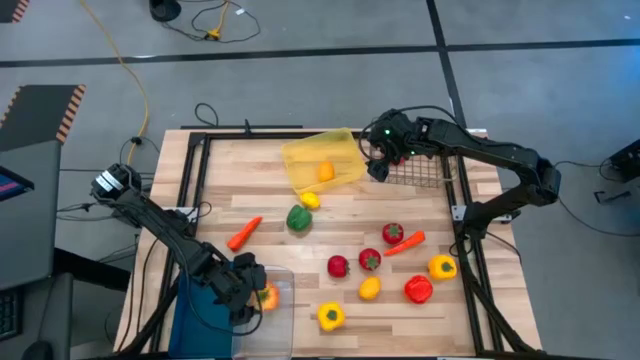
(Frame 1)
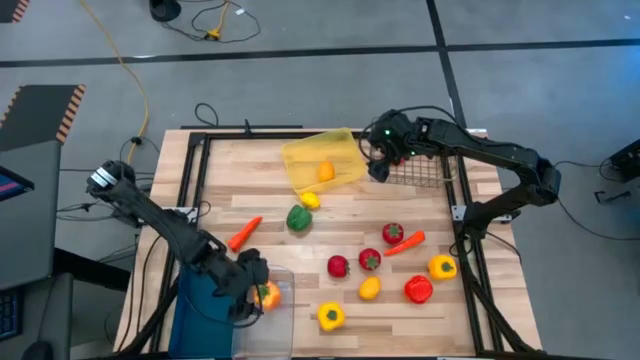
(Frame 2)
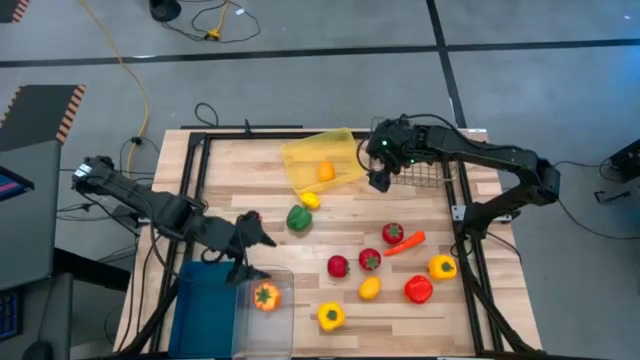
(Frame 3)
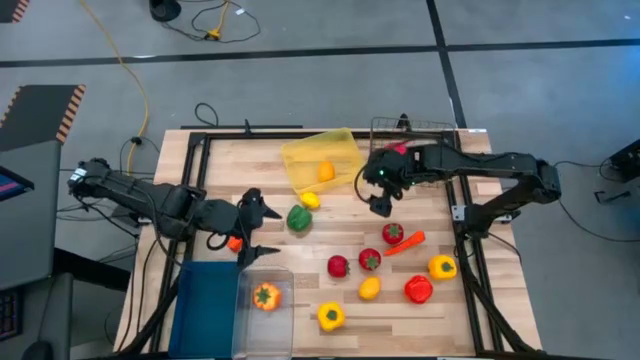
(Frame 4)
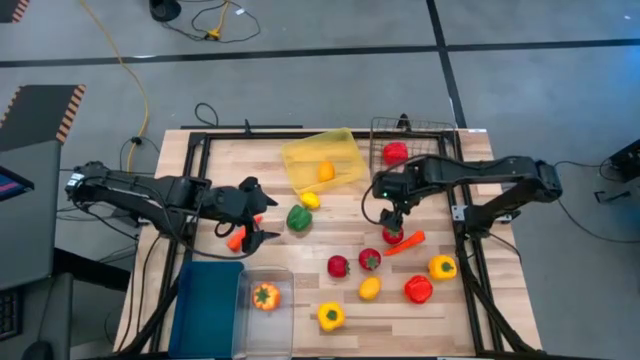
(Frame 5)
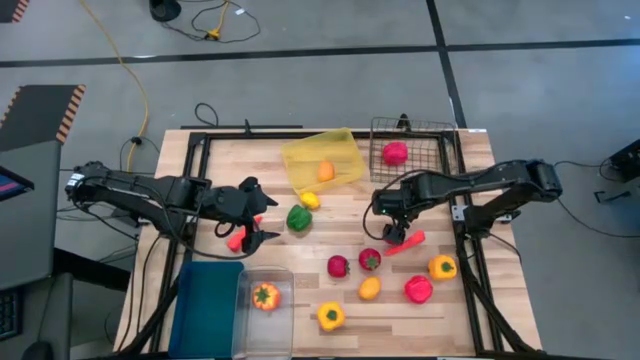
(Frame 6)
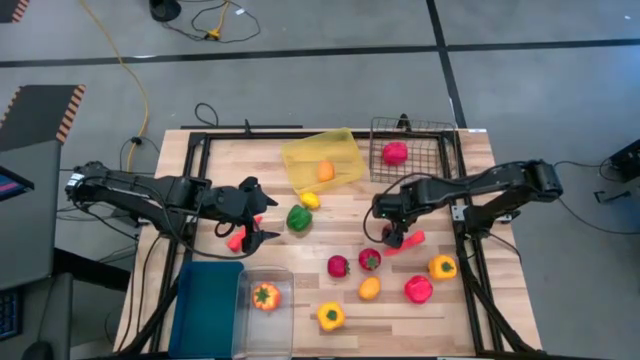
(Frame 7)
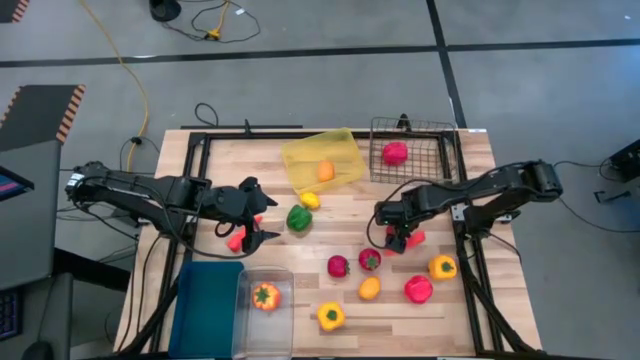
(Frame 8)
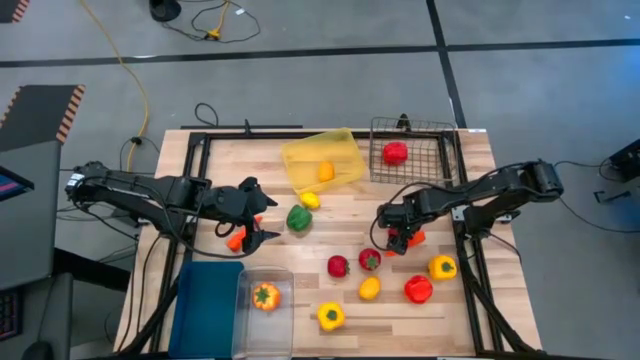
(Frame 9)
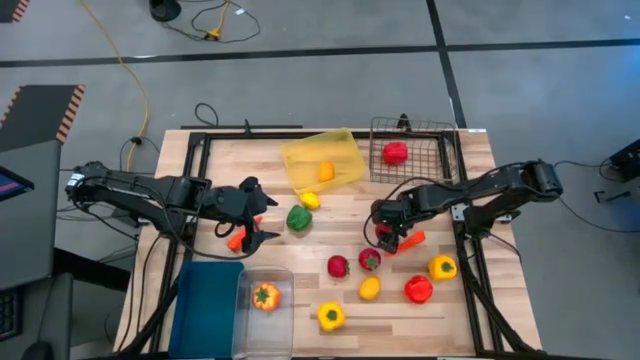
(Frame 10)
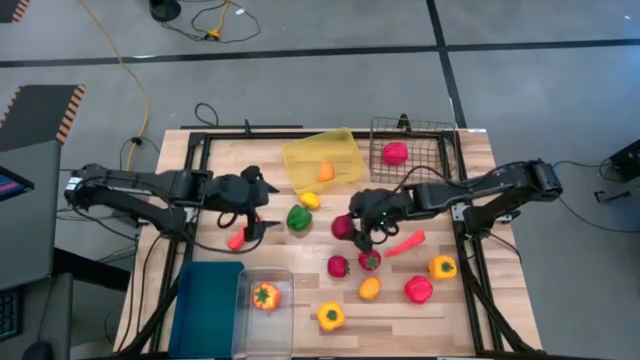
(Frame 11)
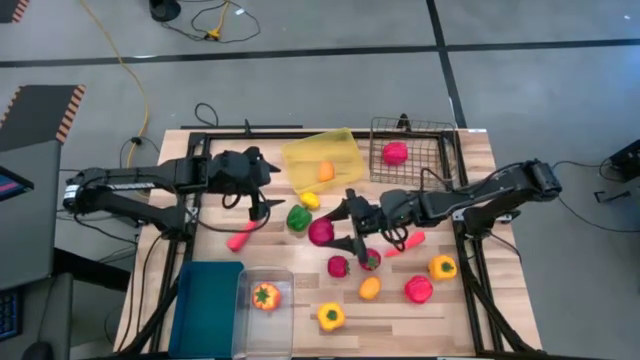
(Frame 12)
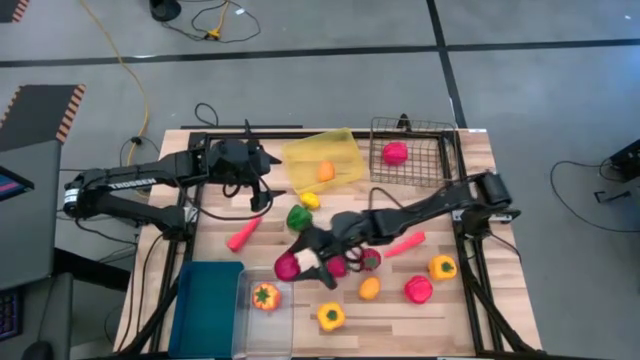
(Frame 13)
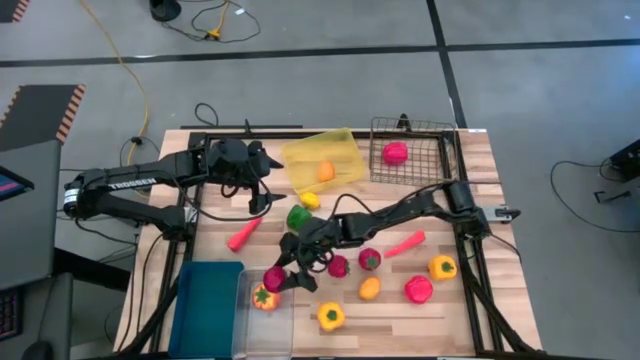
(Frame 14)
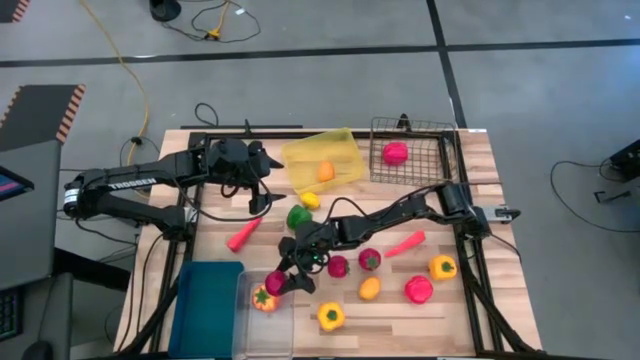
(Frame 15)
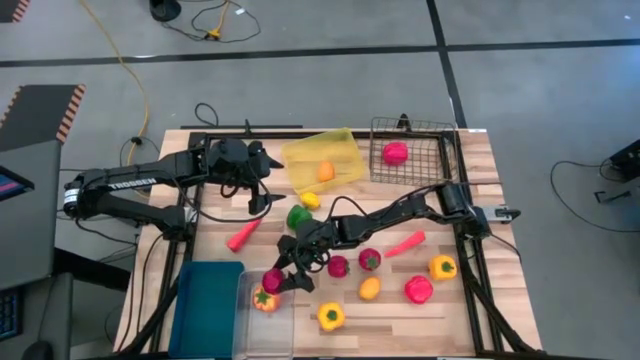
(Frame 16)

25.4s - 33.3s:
Task: Sort produce into baskets
Put the top right red tomato into the transparent bin

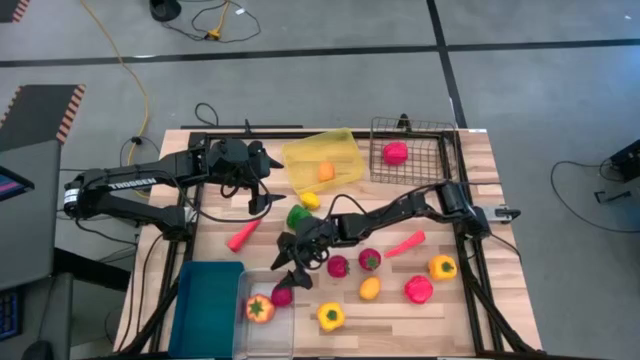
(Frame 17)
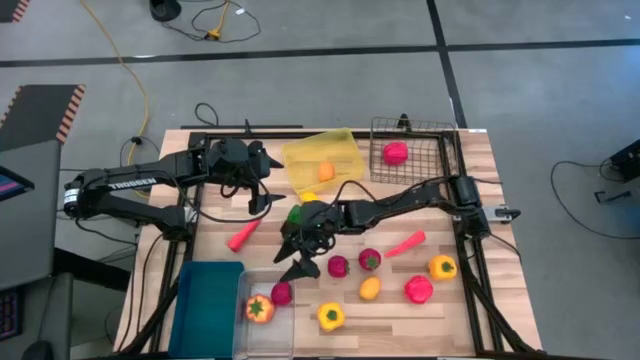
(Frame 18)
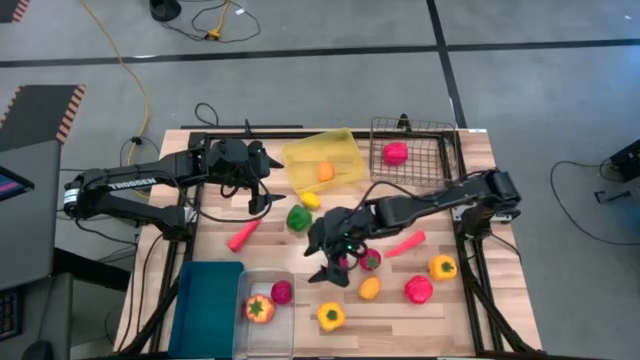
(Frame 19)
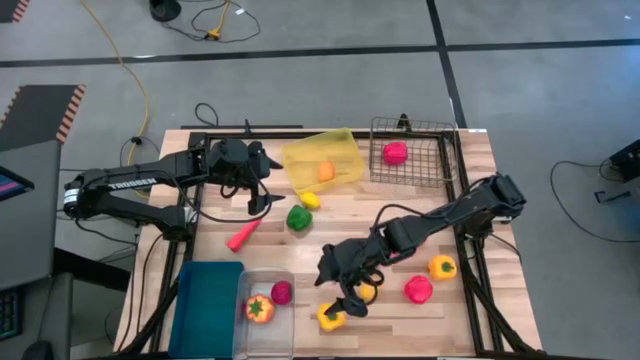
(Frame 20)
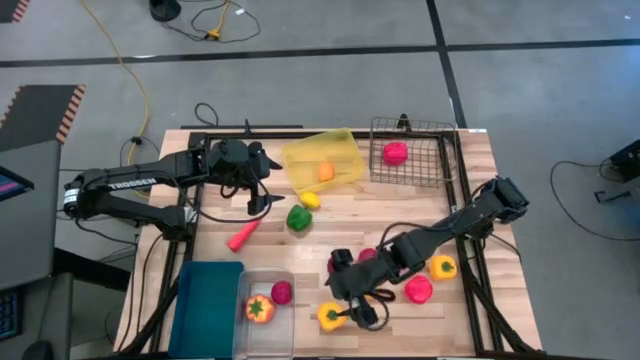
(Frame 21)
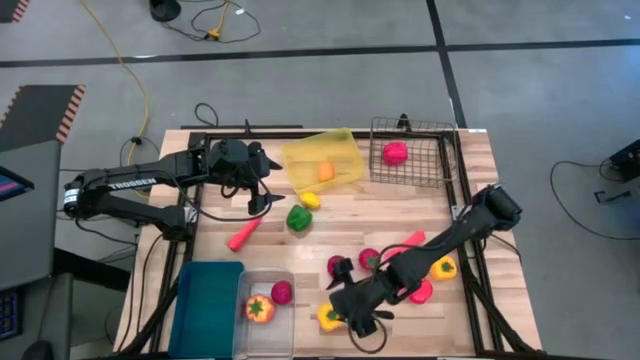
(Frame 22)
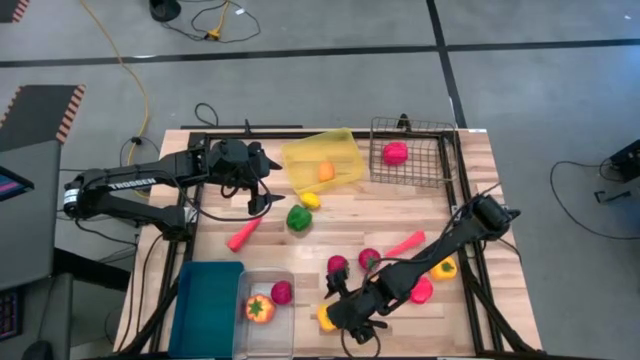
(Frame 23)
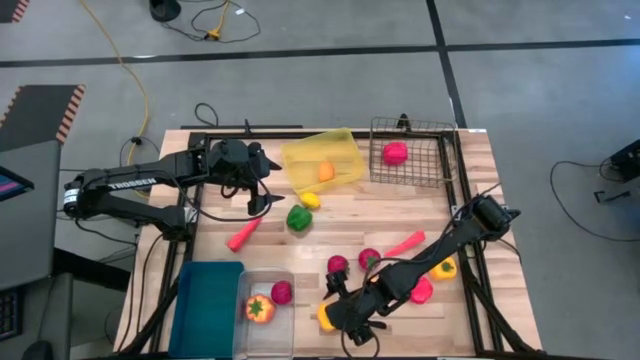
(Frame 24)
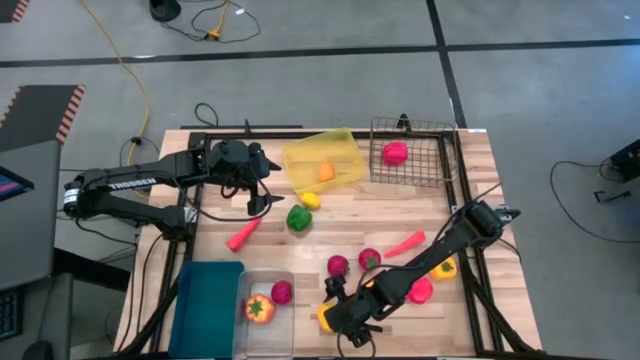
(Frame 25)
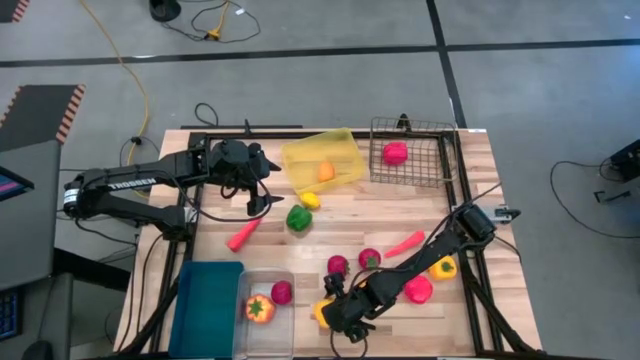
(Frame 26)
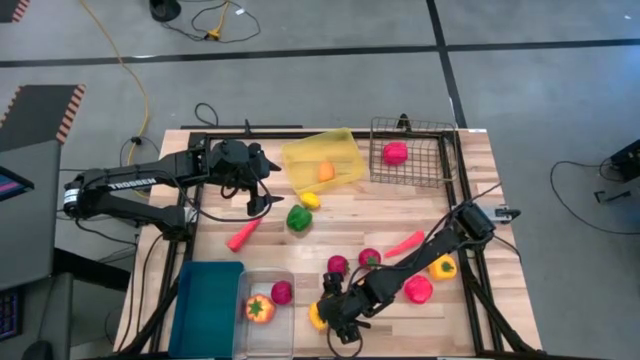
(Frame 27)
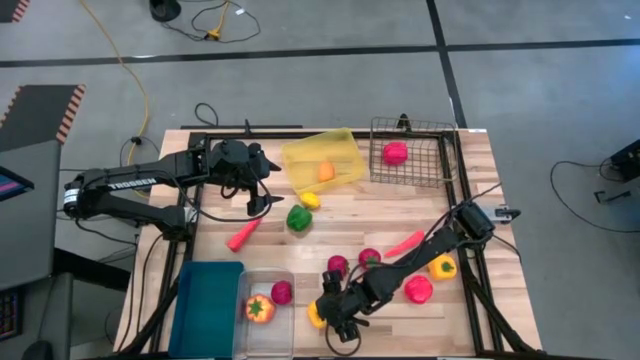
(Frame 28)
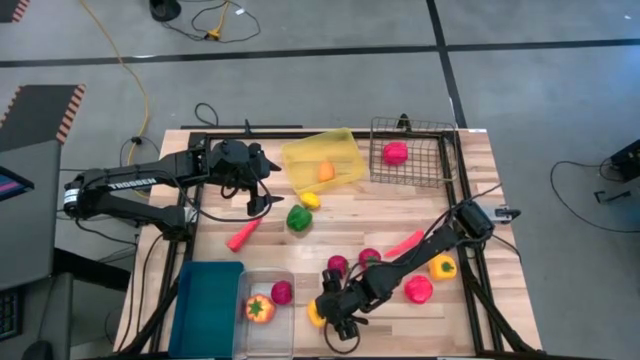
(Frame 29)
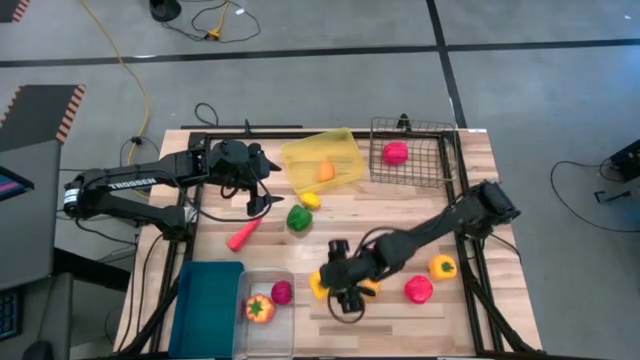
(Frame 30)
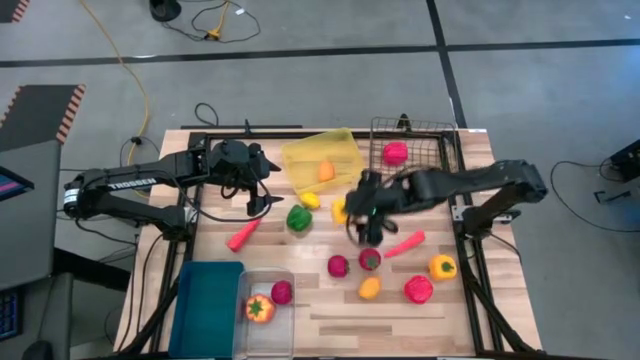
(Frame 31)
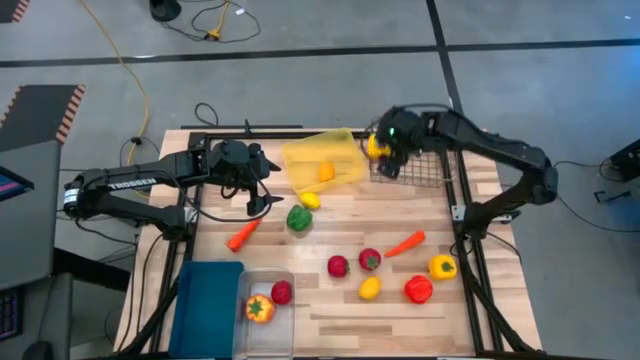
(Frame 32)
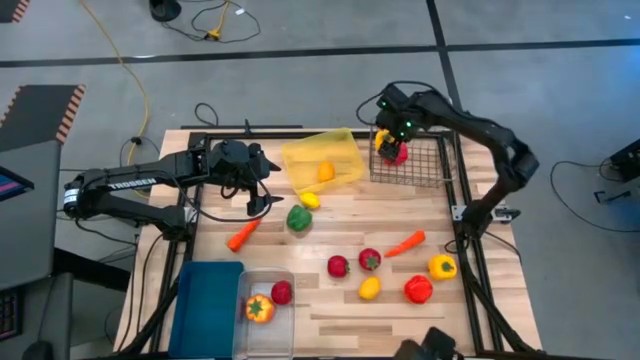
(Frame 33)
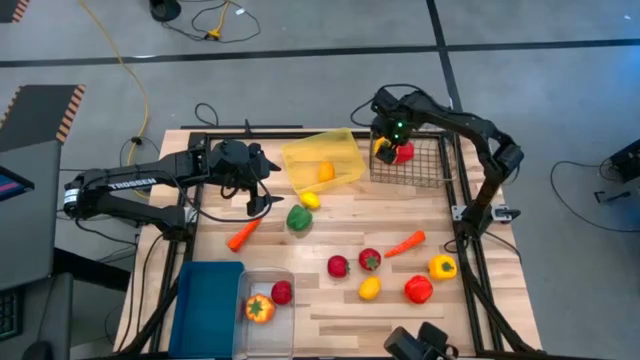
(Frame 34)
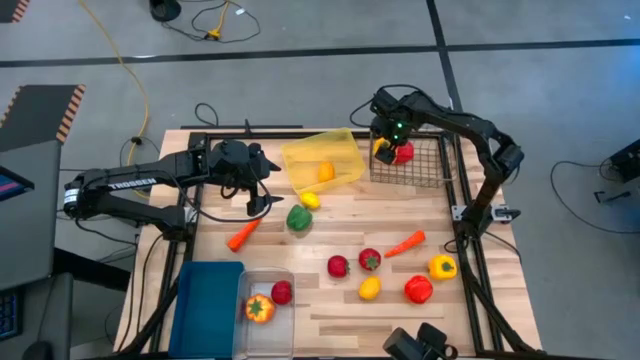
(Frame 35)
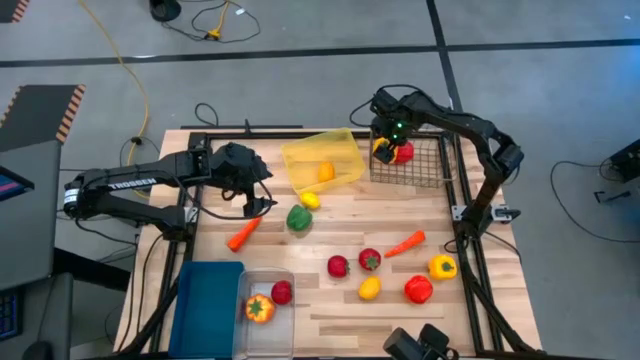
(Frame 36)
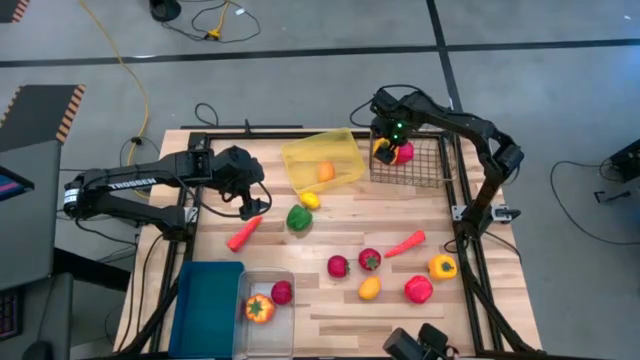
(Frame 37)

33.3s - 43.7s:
Put the bottom yellow bell pepper into the wire basket

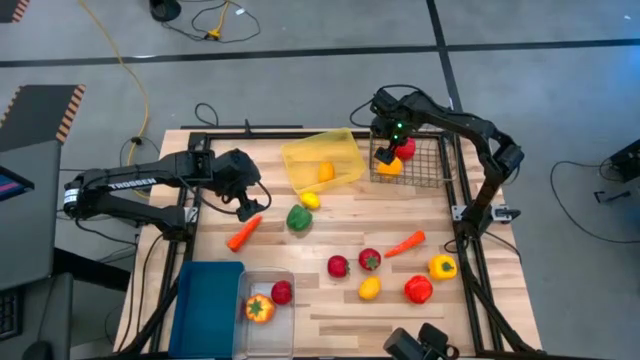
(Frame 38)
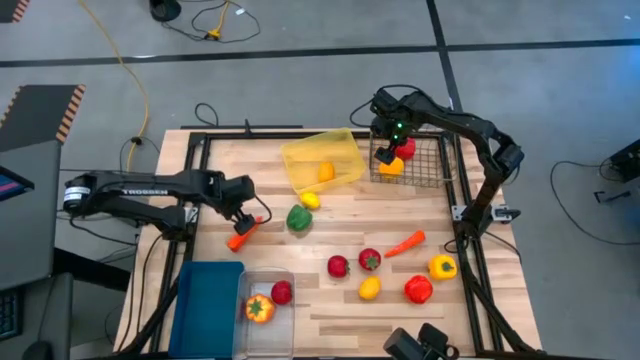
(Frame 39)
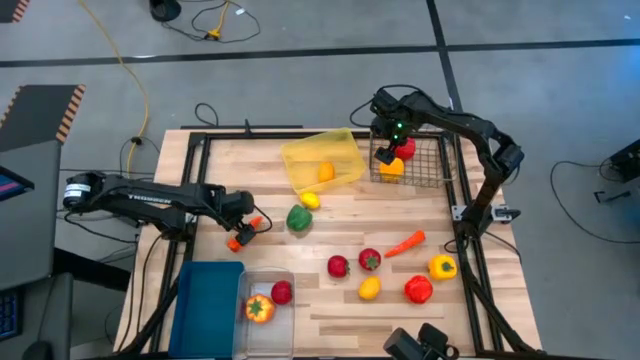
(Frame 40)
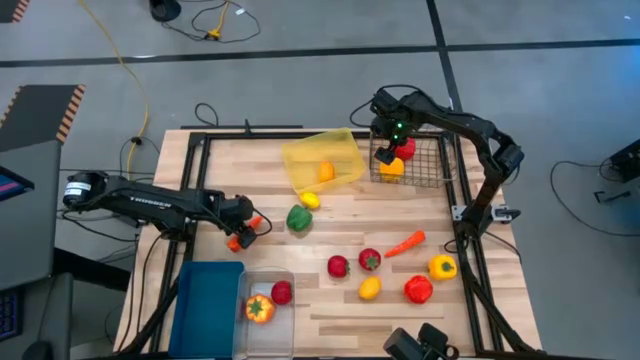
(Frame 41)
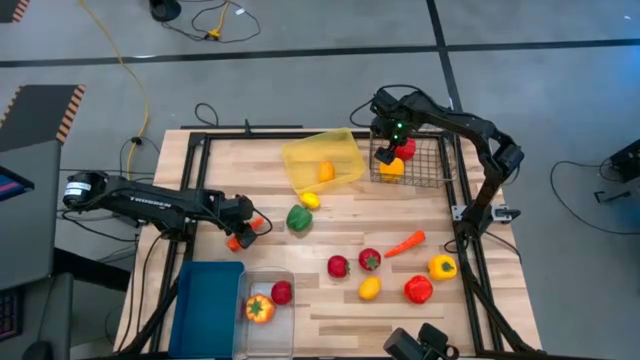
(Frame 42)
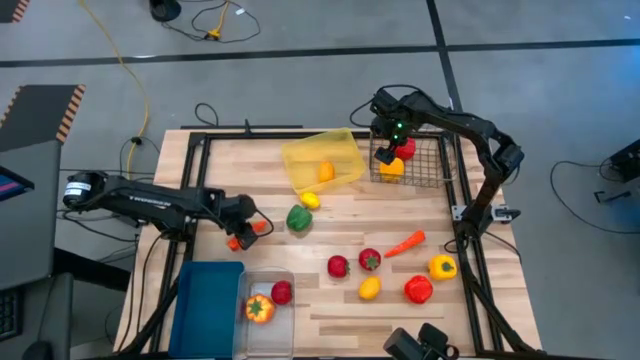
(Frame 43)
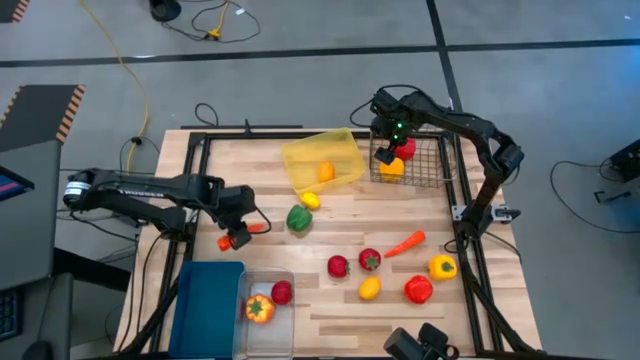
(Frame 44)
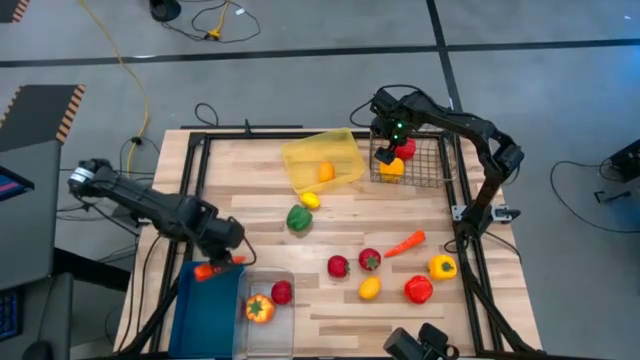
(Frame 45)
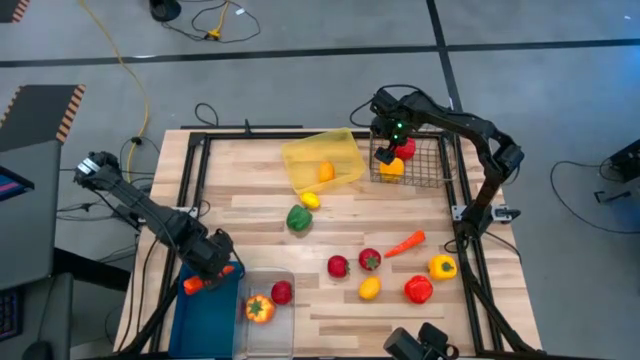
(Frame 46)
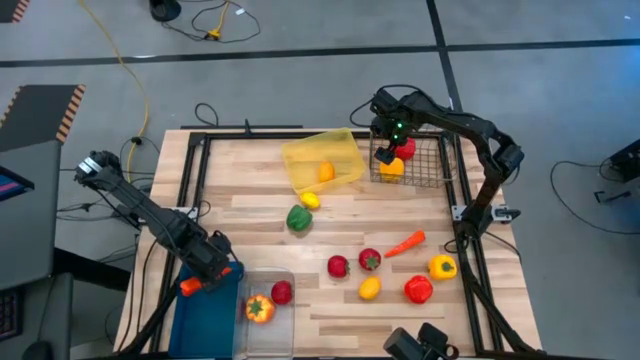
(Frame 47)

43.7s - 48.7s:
Put the left carrot into the blue bin
